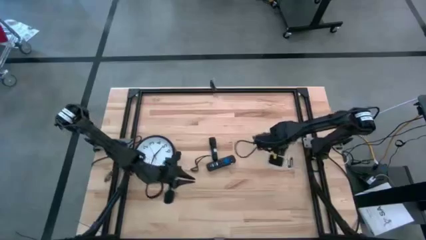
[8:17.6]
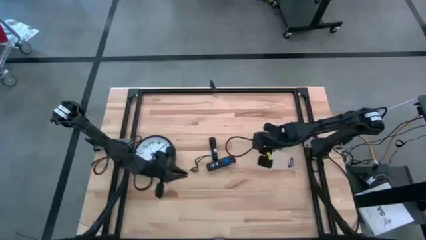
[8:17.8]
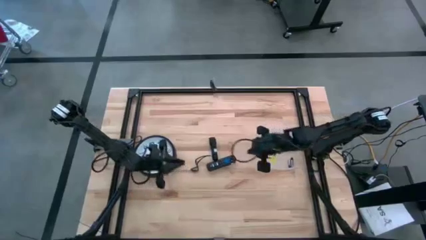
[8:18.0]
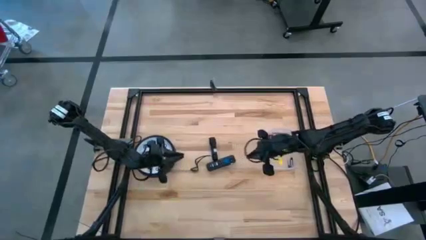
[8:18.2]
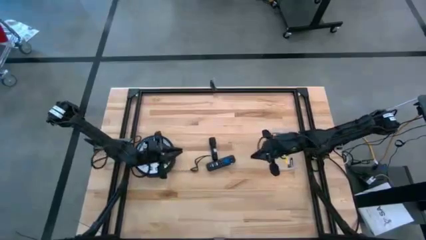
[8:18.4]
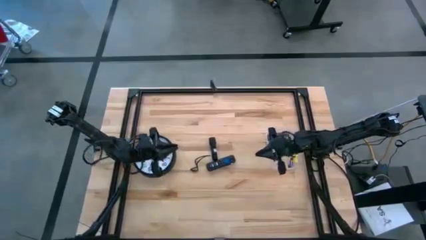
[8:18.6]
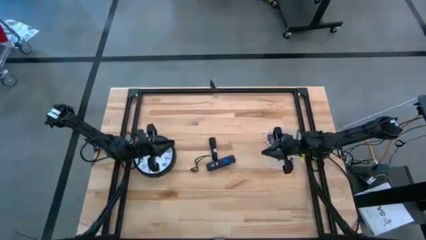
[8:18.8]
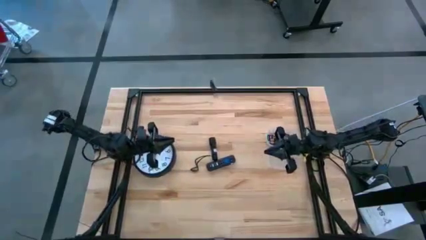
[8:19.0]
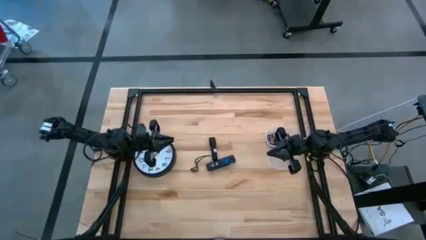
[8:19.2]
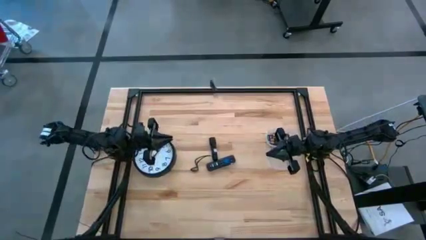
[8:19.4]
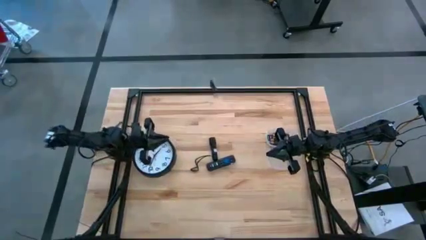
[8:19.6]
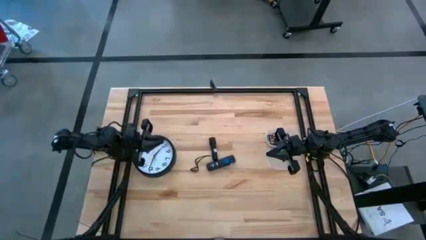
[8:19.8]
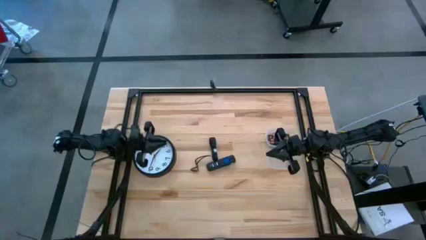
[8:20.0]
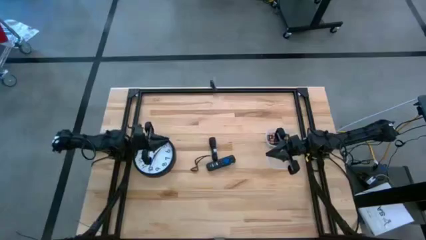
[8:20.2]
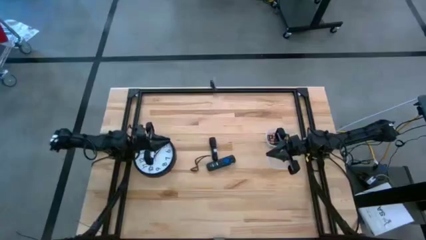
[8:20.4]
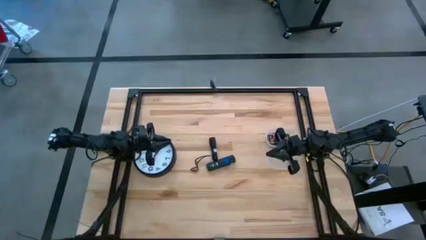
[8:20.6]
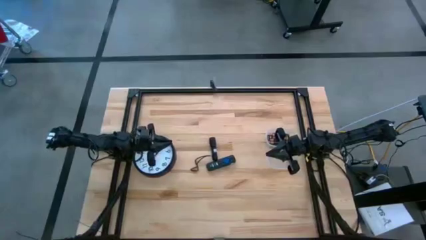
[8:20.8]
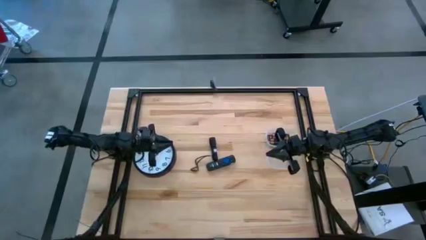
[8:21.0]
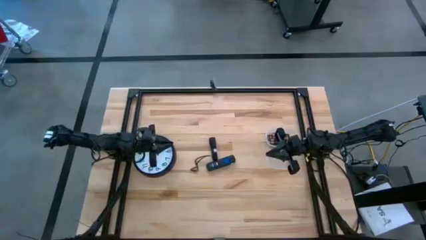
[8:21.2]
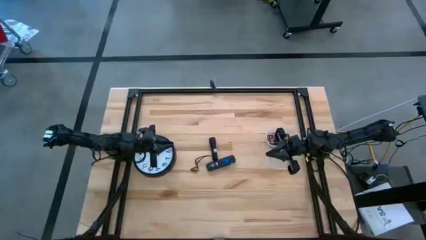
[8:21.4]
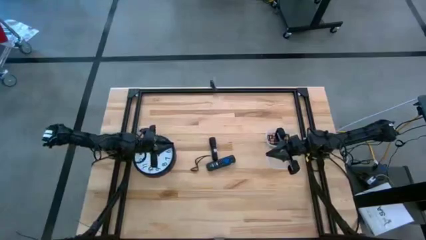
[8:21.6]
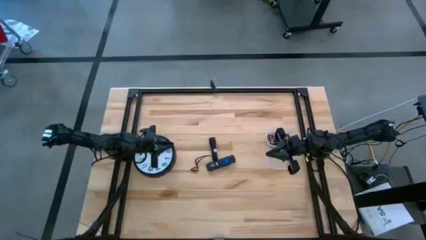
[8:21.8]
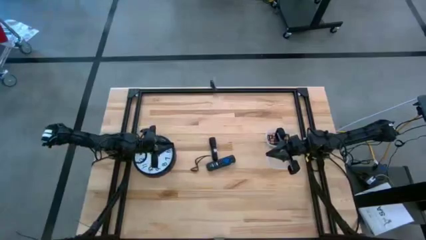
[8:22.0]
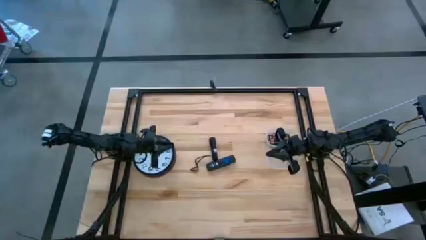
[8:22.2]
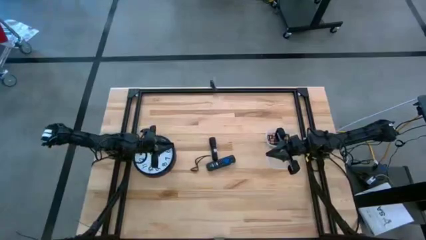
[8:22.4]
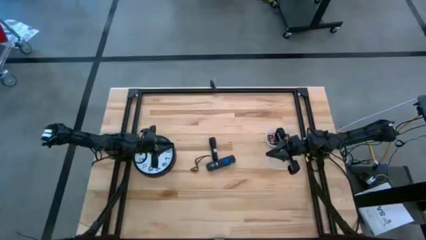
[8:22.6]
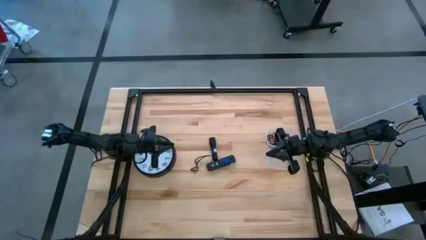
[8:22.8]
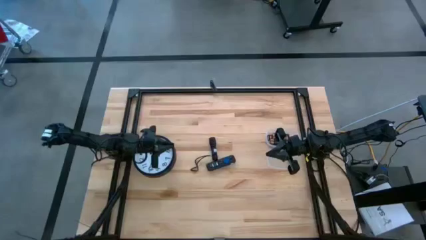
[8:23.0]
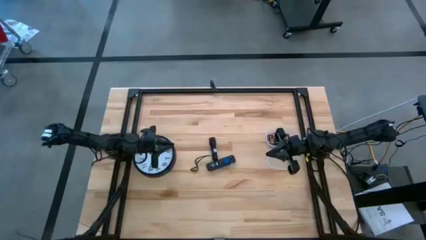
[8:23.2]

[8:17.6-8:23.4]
Task: Insert battery
Return to Home Position

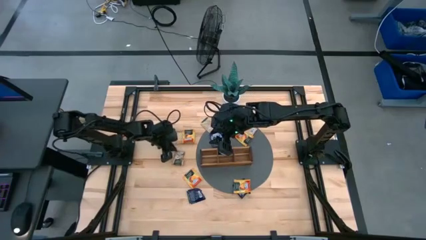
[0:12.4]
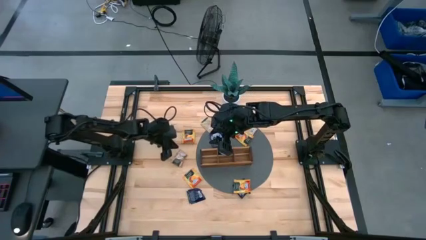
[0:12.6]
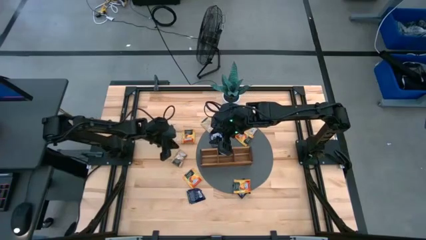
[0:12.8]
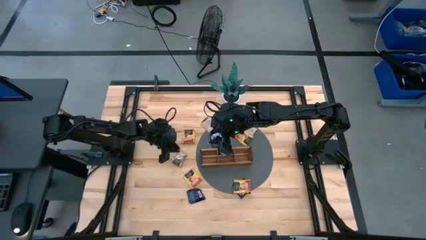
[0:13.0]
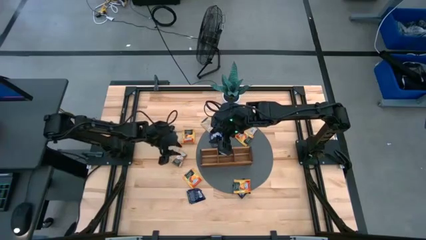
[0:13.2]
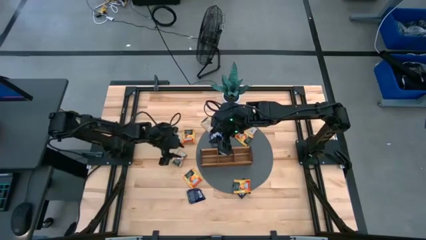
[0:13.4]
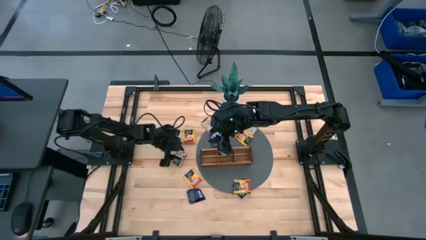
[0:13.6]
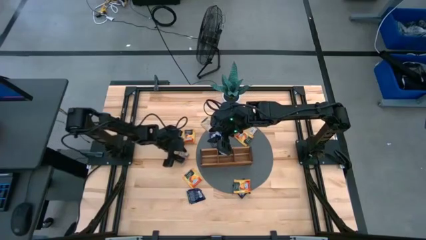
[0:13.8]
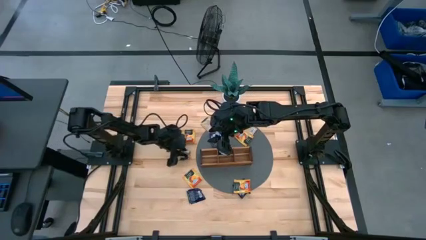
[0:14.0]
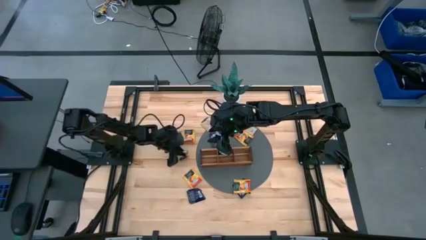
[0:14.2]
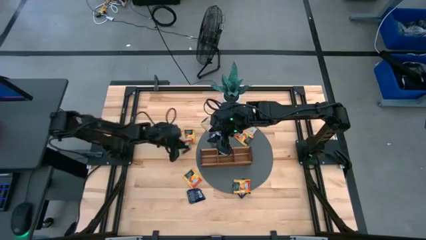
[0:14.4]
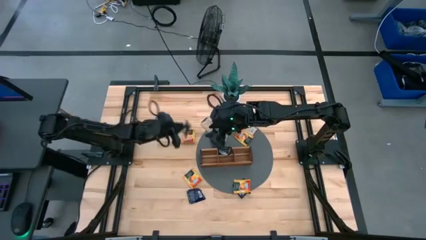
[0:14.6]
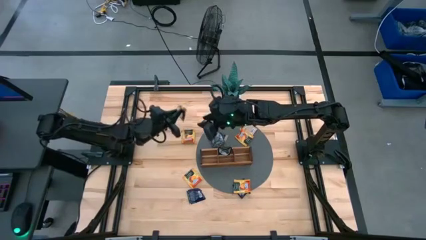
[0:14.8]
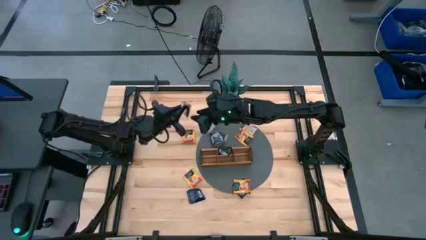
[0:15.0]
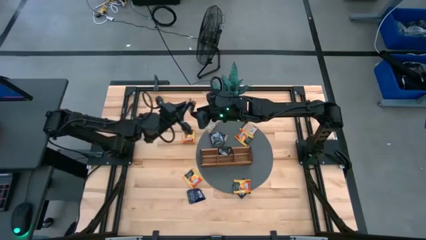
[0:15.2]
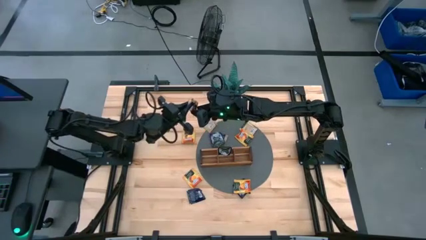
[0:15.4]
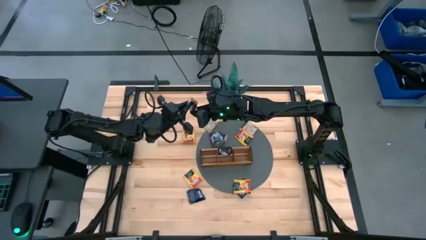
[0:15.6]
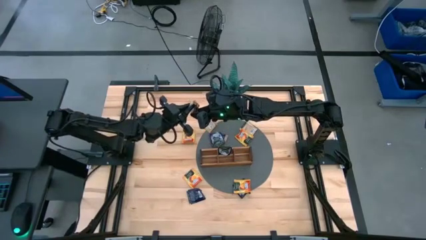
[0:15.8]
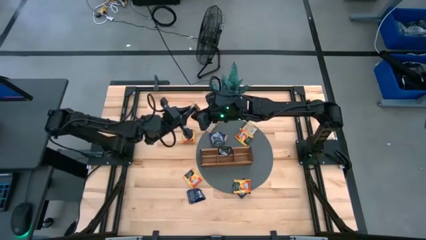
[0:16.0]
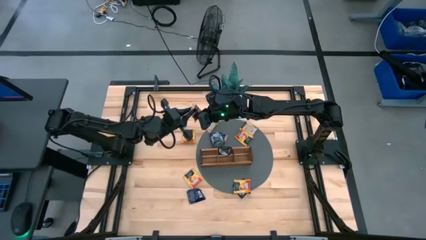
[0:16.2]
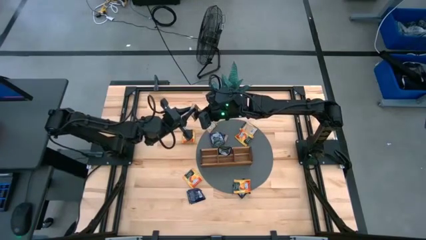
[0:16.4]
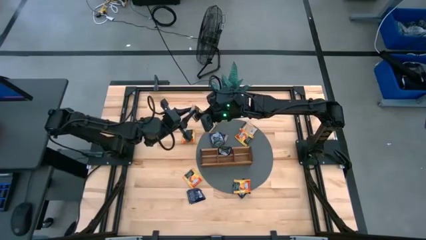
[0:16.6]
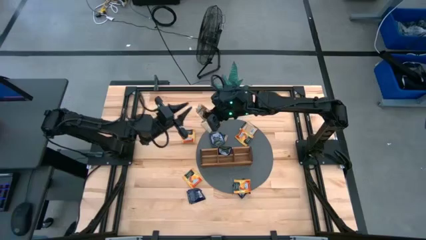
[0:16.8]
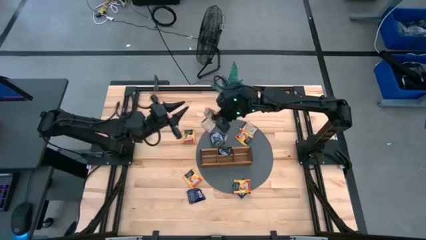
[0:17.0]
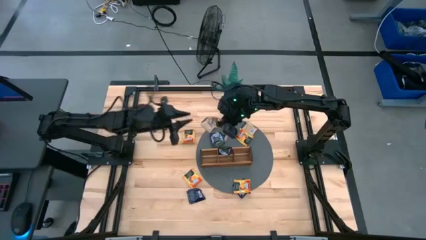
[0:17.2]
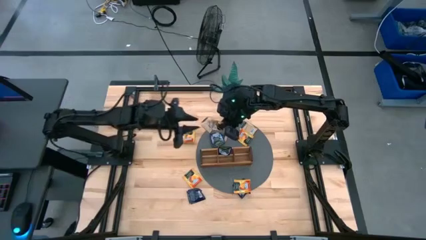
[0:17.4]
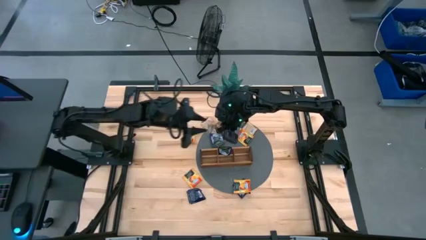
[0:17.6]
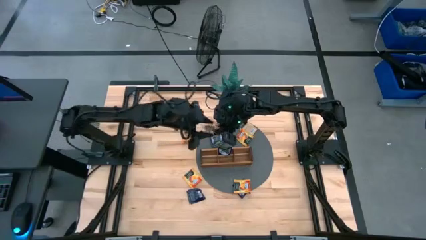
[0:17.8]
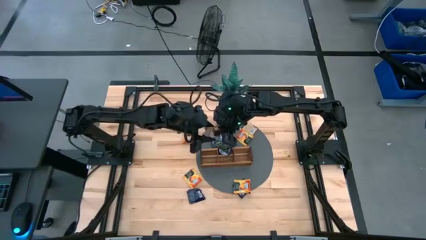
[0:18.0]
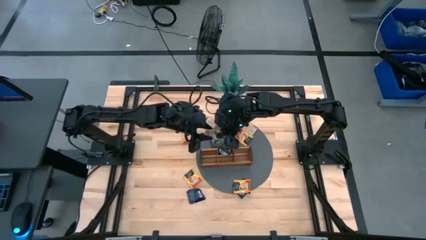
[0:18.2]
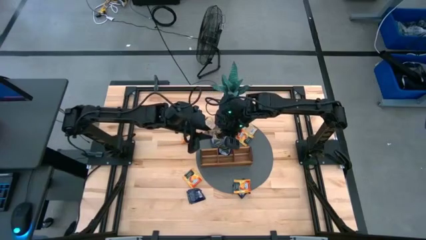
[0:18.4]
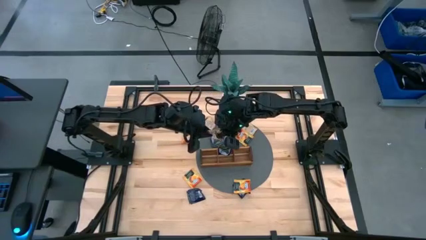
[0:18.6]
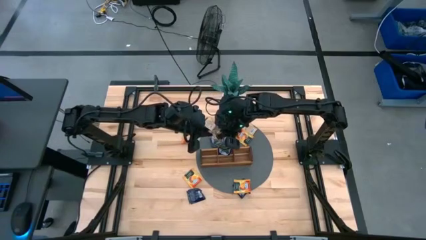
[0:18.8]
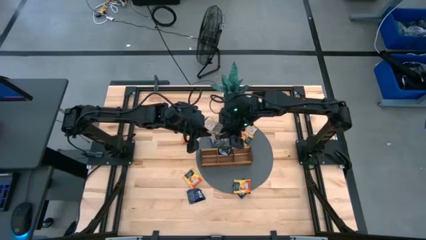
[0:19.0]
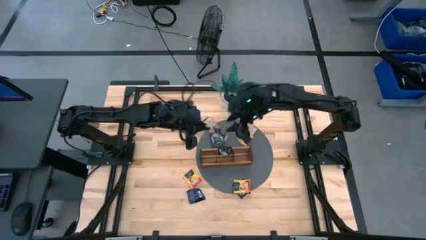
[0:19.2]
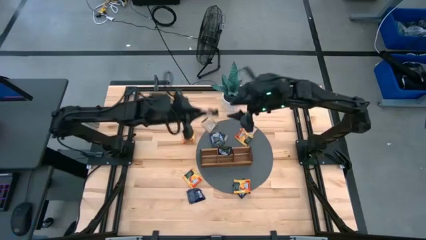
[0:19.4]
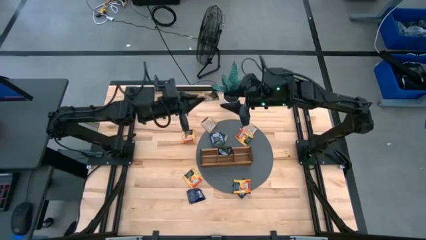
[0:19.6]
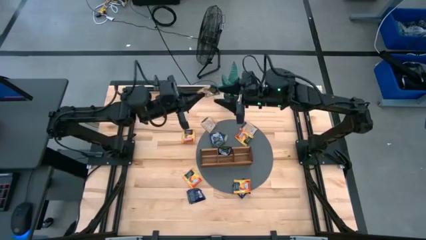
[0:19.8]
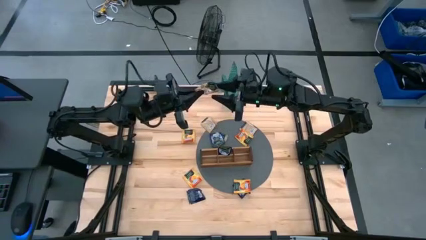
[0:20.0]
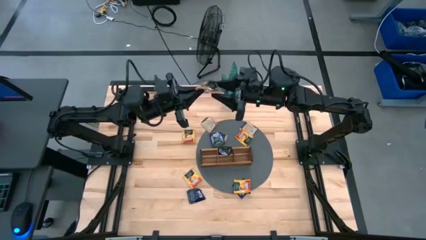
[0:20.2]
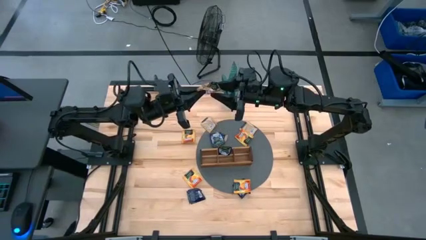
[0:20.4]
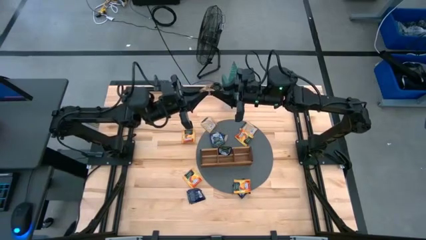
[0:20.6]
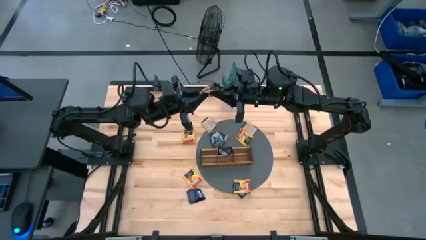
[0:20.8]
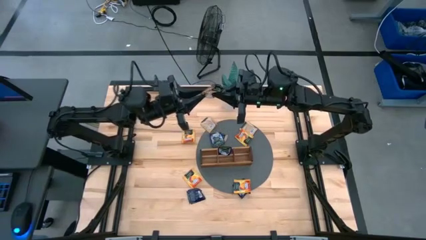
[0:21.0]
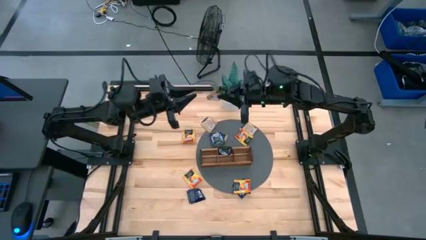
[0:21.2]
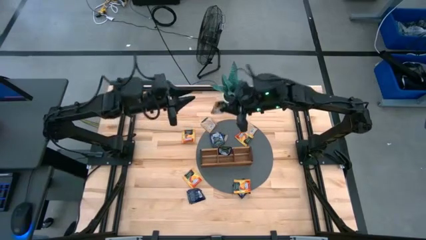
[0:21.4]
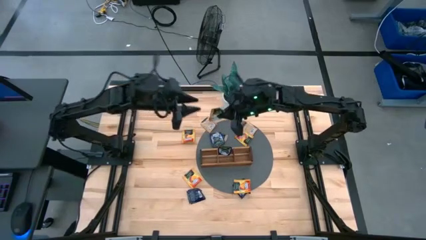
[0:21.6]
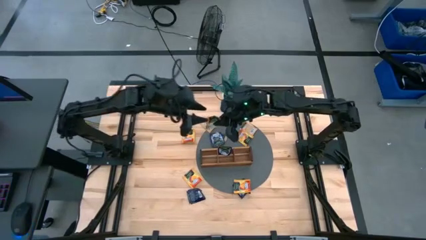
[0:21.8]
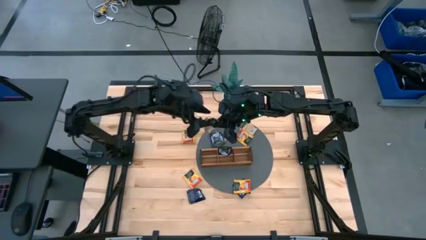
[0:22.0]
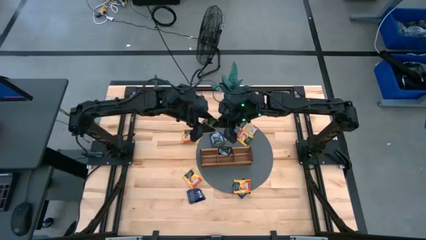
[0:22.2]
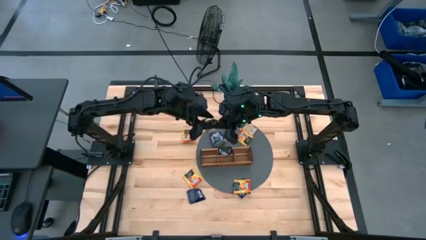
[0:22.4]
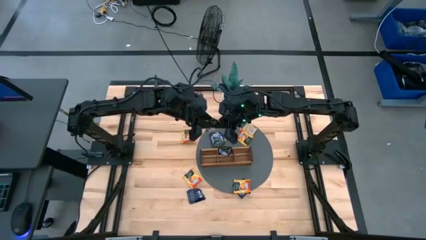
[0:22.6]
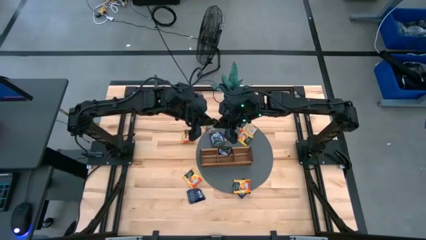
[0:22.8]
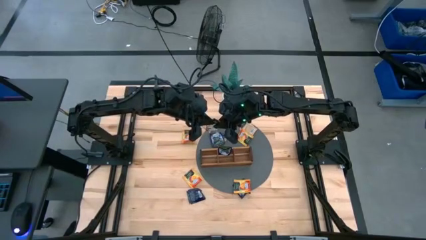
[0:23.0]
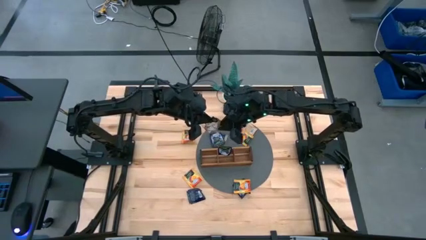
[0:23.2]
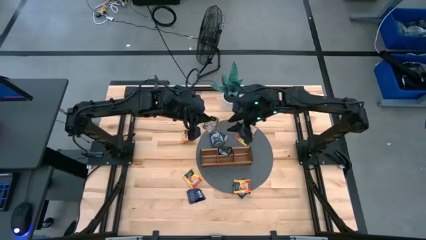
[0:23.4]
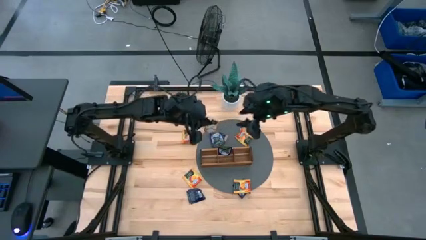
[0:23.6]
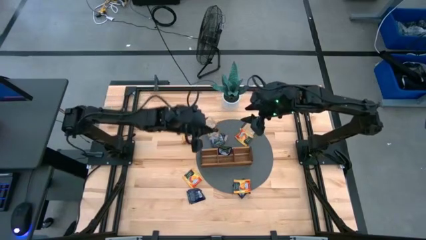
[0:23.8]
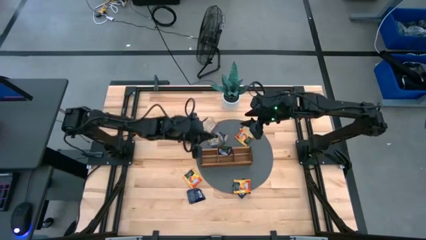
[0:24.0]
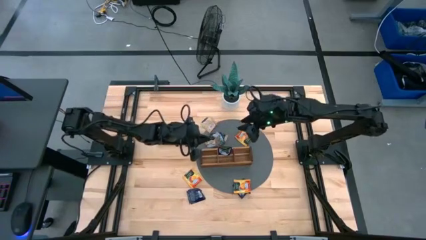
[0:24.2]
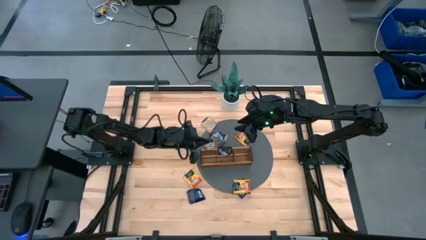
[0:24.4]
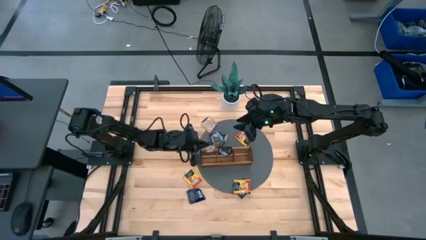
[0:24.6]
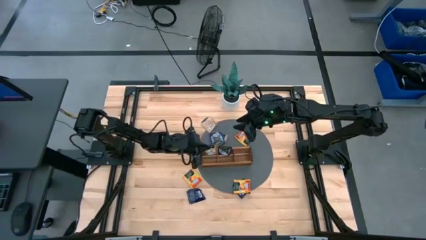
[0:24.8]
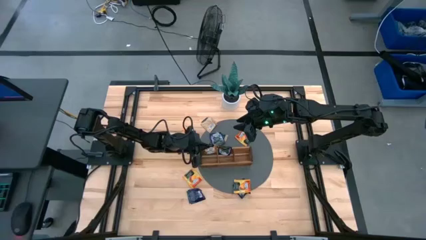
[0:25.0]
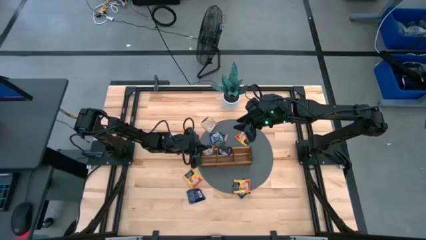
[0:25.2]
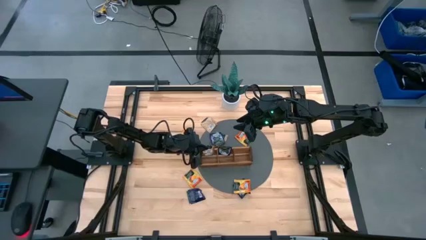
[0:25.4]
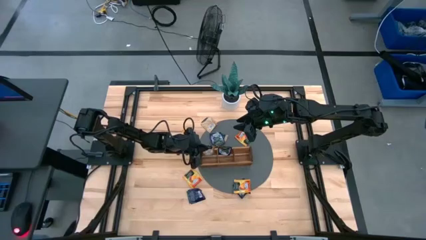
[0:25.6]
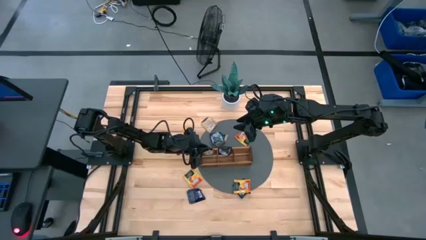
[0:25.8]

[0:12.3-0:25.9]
Task: Pick & Place Tea
Put the brown tea bag into the left section of the wooden organizer
